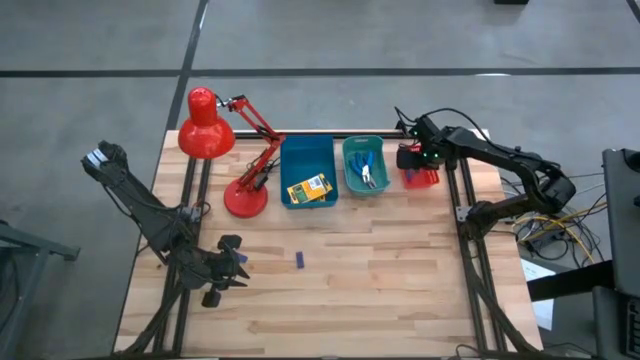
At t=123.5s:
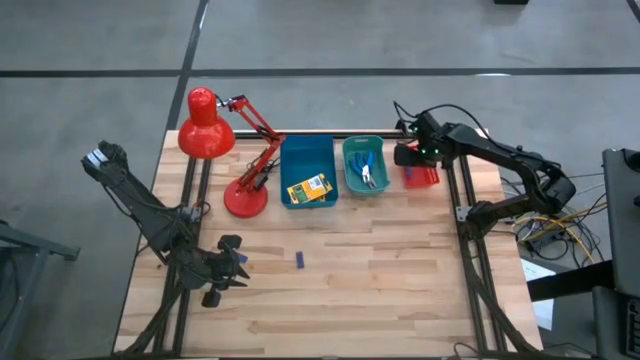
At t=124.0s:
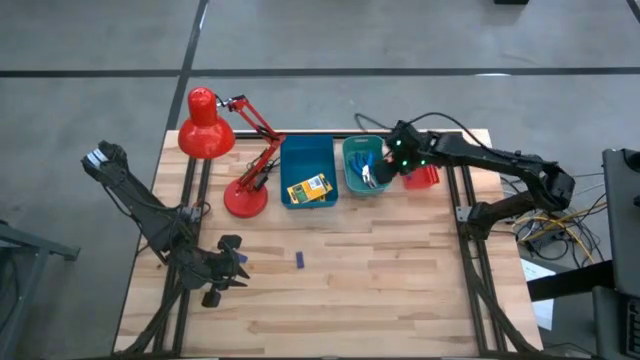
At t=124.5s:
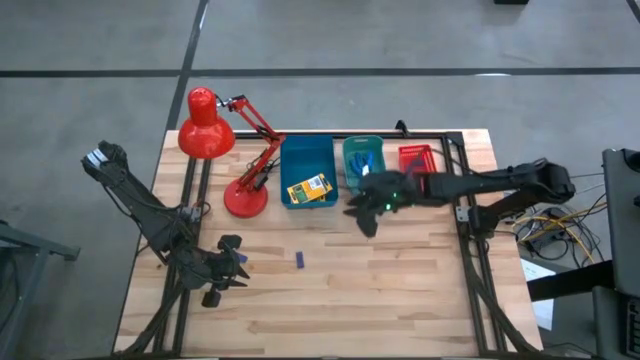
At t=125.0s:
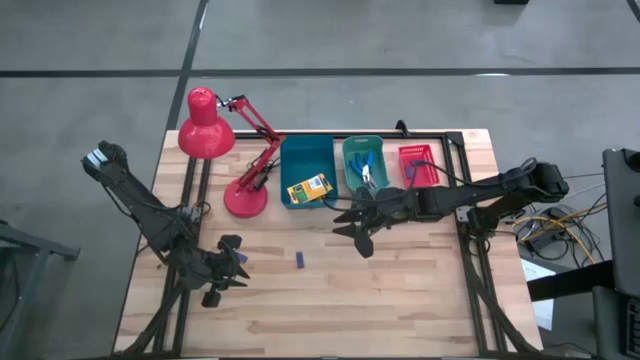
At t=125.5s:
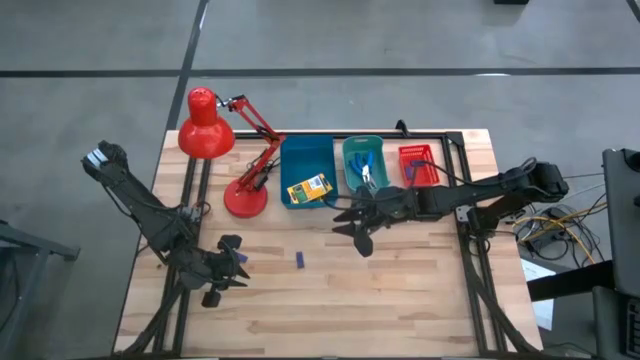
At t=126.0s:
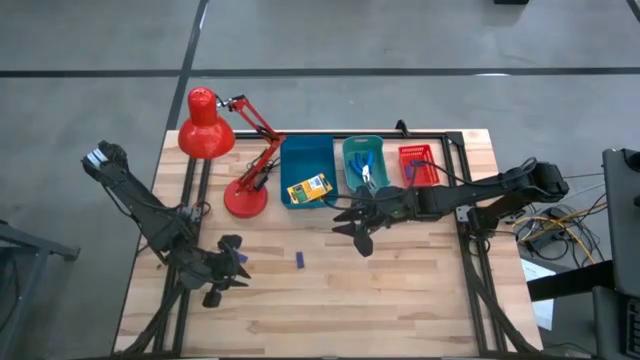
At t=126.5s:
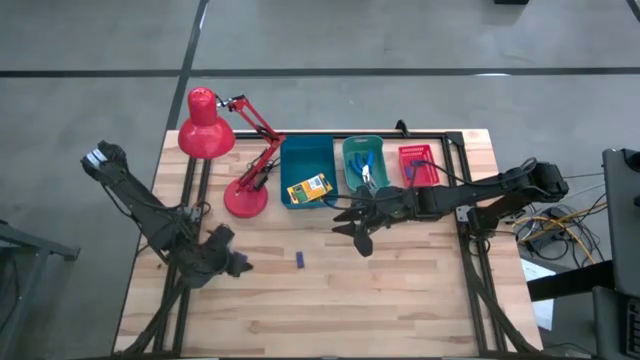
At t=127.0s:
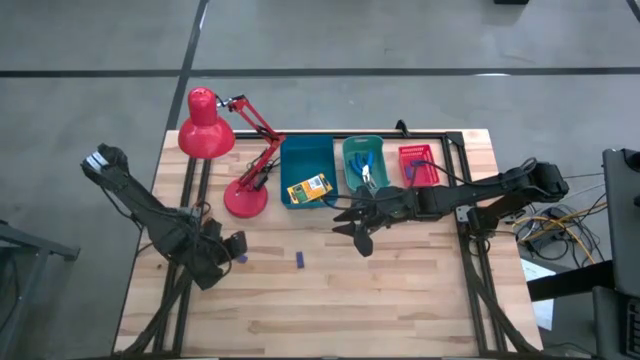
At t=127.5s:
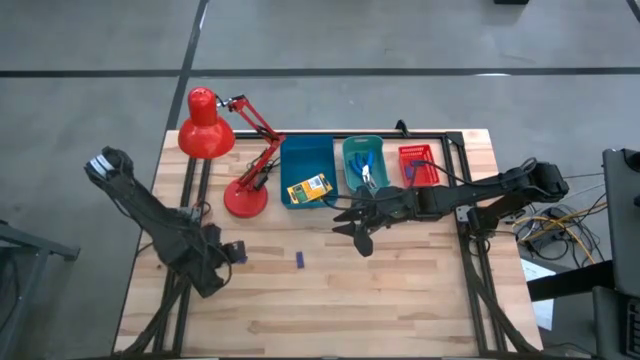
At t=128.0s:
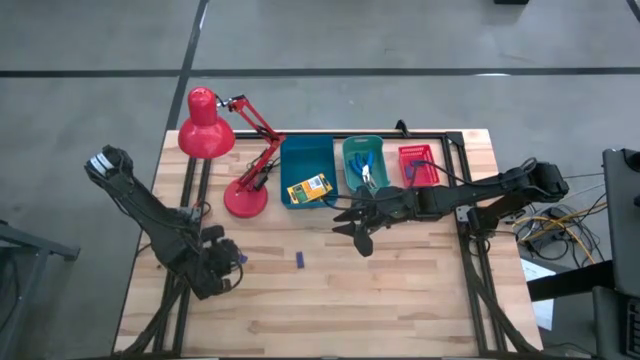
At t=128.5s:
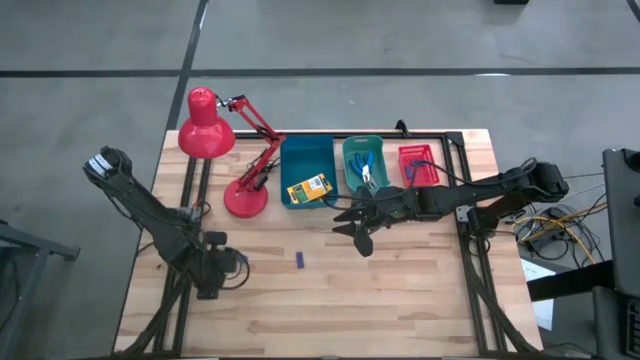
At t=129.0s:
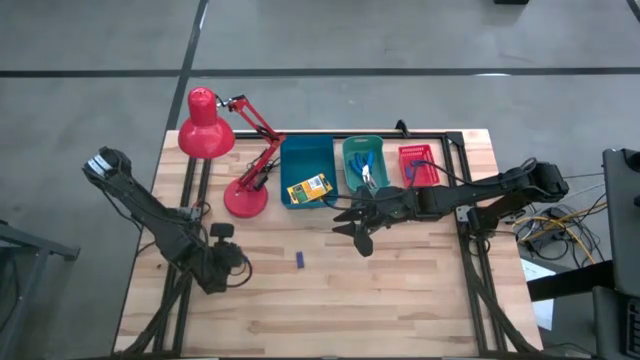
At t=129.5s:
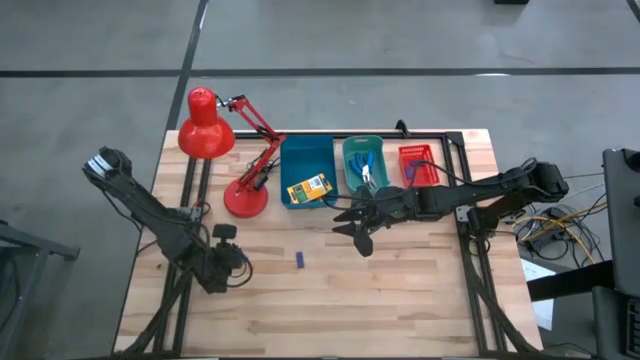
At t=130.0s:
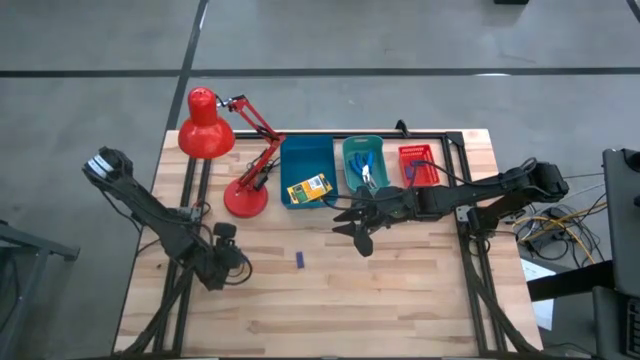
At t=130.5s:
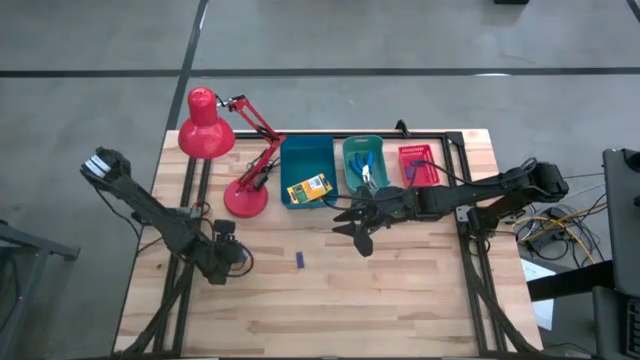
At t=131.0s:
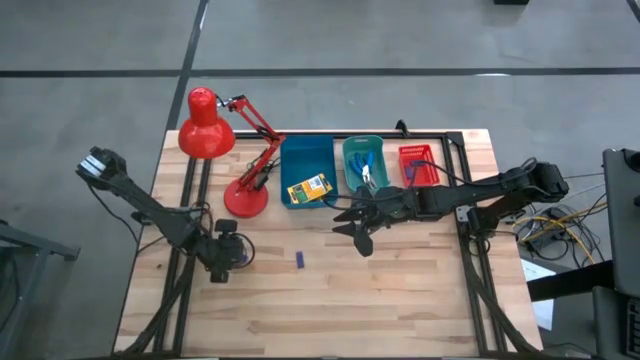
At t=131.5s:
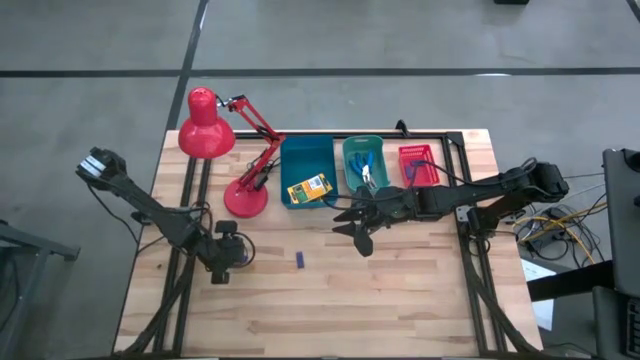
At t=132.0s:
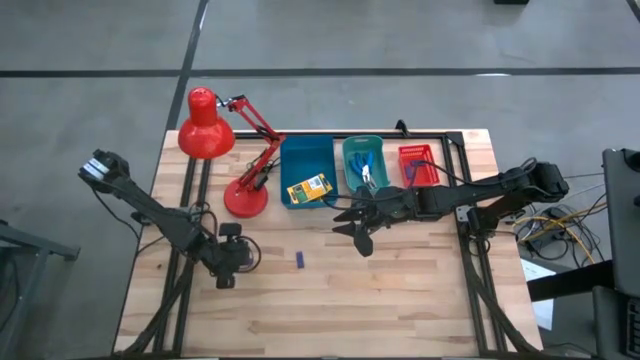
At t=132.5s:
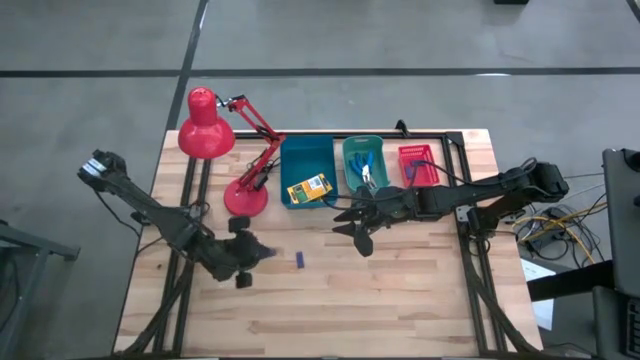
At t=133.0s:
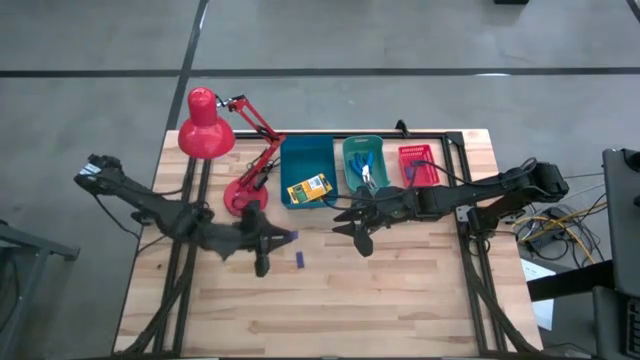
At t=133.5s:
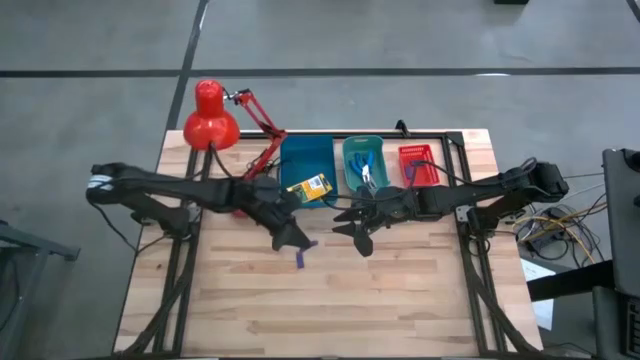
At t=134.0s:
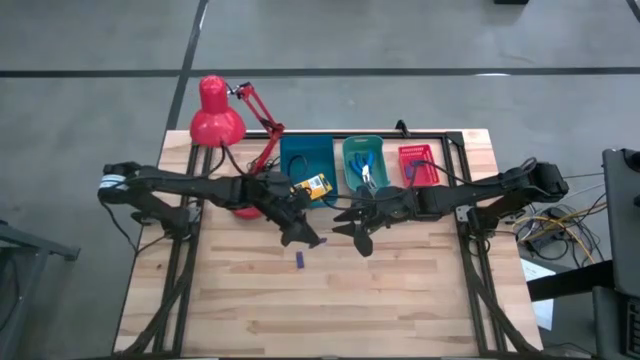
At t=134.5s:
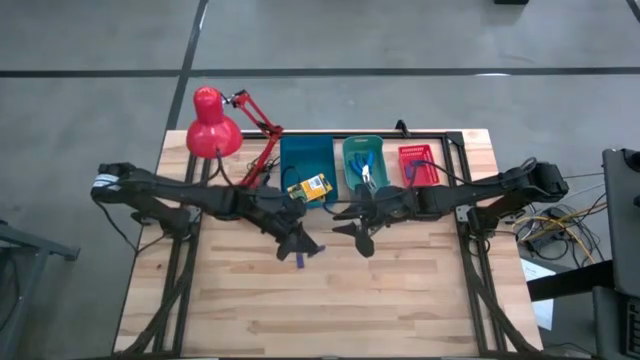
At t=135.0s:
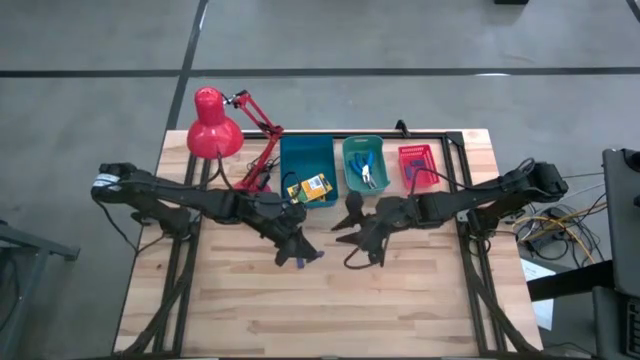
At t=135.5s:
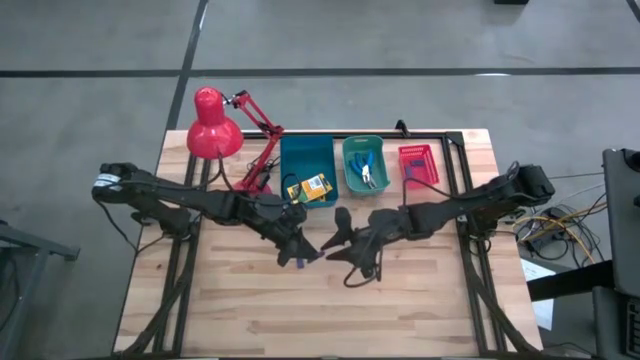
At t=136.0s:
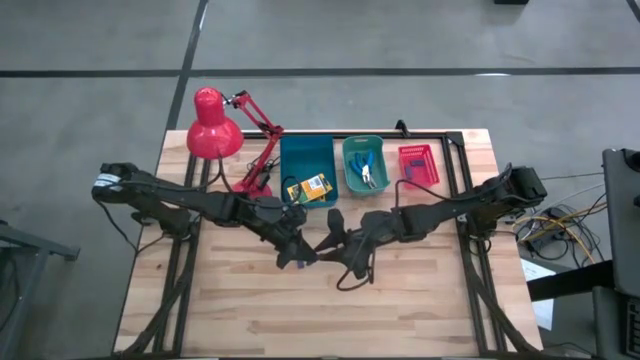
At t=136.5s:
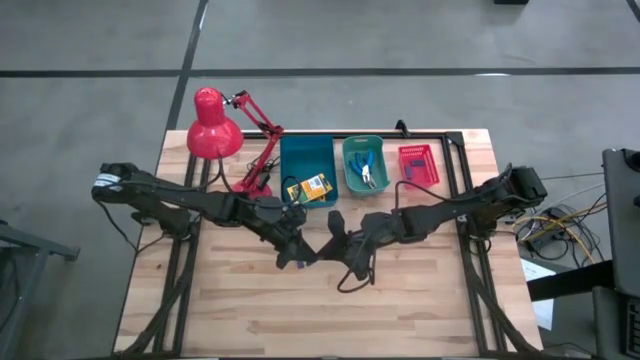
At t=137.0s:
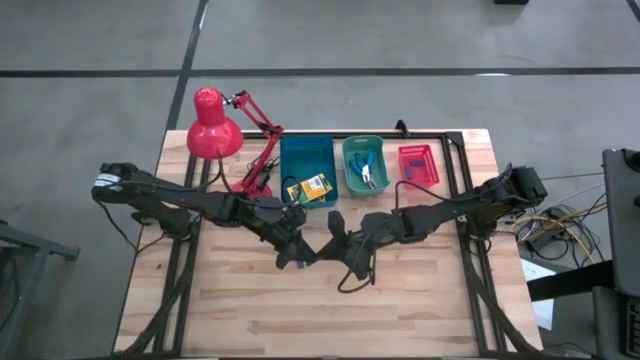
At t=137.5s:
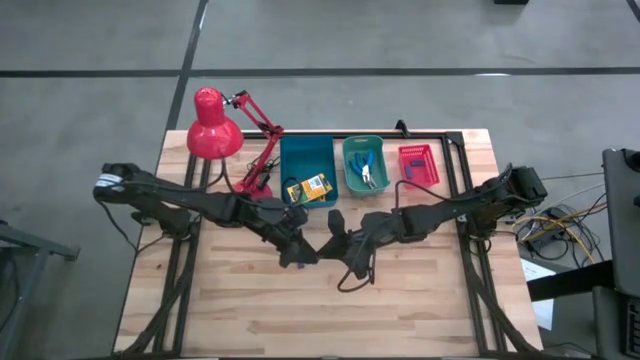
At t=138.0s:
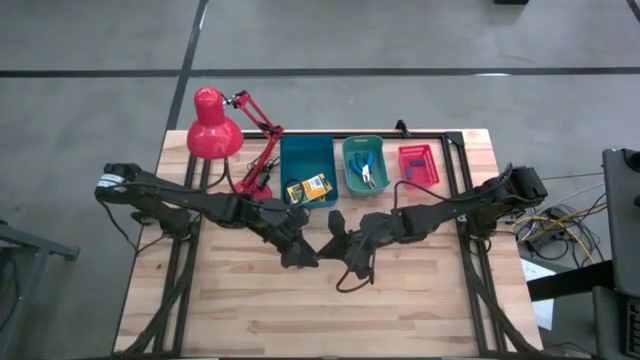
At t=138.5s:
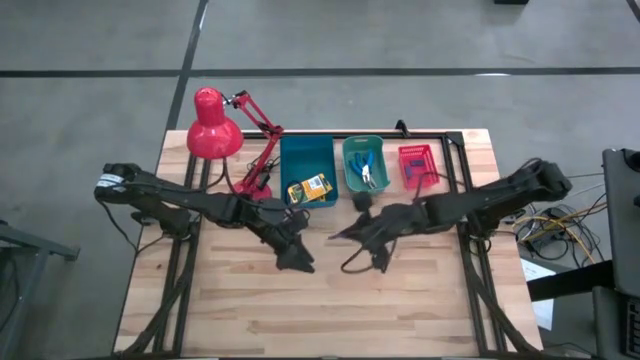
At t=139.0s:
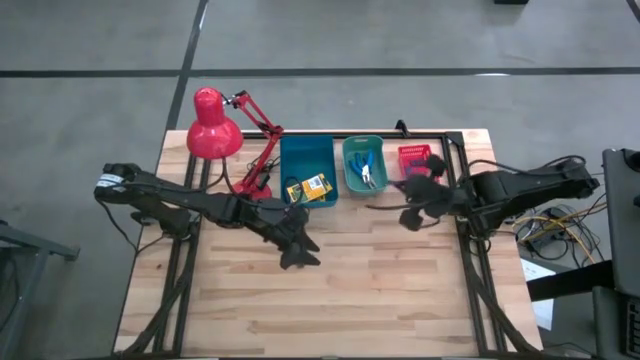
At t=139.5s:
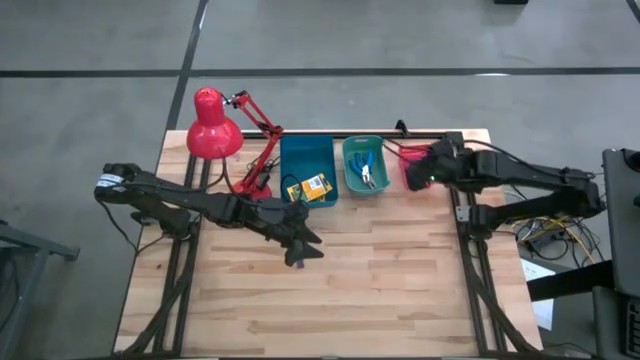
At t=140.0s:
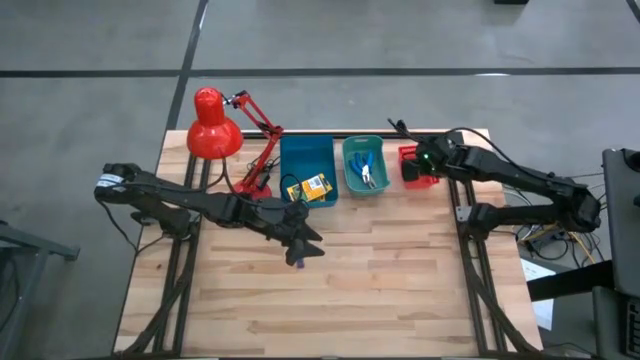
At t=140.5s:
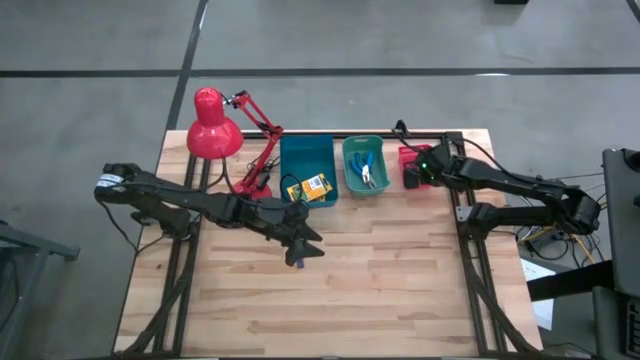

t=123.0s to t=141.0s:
Task: Pick & Place School Supplies
Put the blue eraser into the red bin
